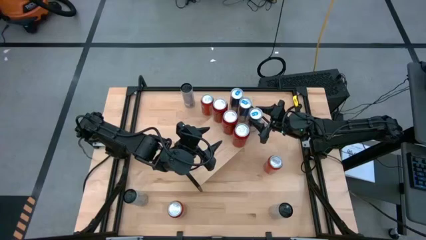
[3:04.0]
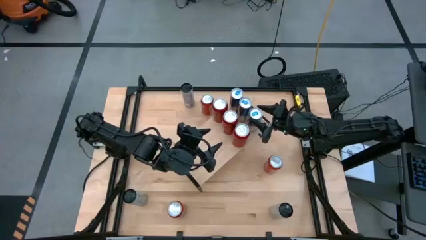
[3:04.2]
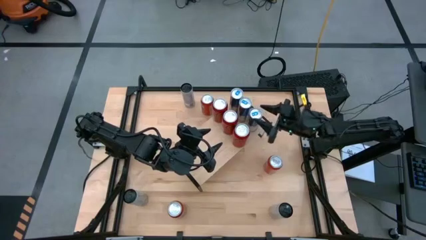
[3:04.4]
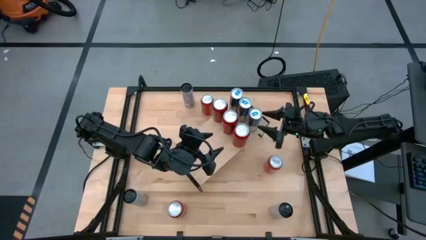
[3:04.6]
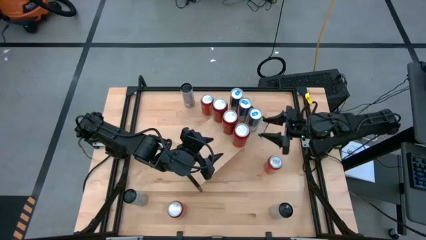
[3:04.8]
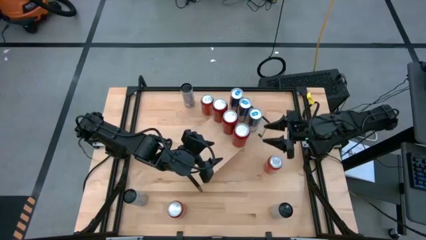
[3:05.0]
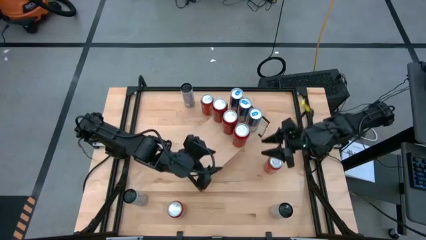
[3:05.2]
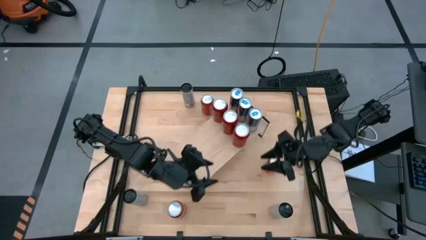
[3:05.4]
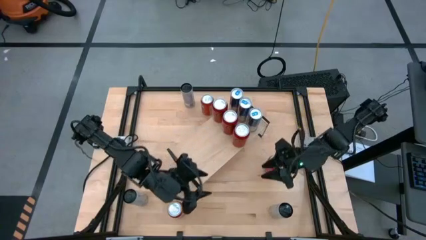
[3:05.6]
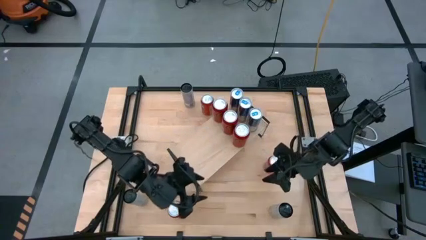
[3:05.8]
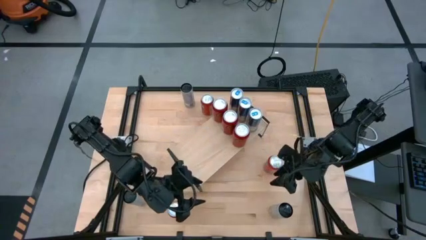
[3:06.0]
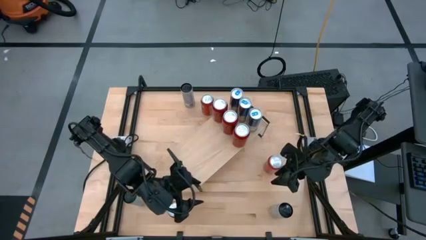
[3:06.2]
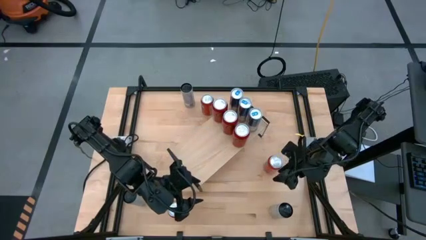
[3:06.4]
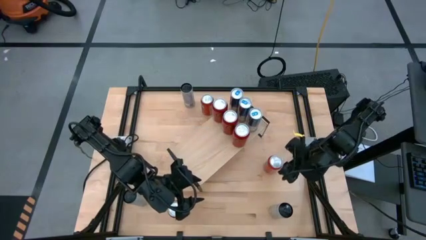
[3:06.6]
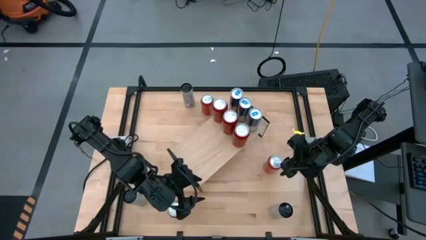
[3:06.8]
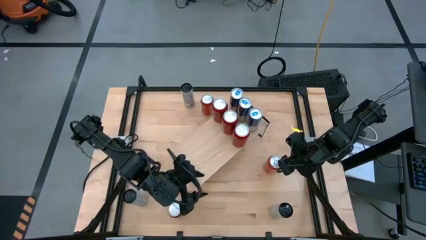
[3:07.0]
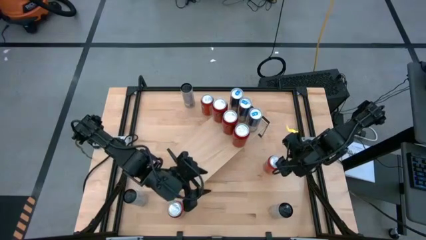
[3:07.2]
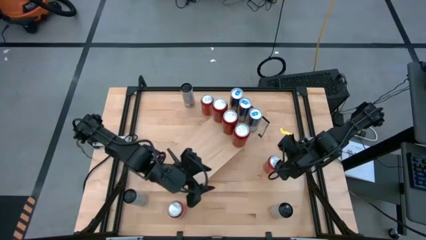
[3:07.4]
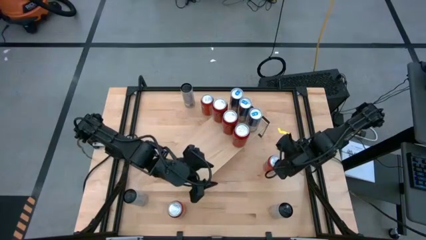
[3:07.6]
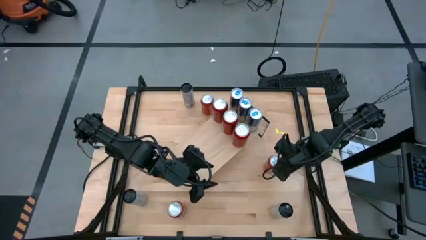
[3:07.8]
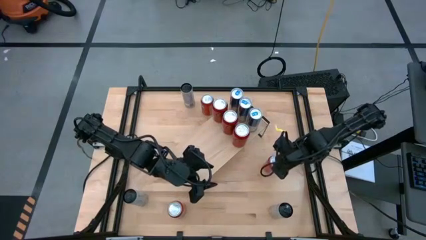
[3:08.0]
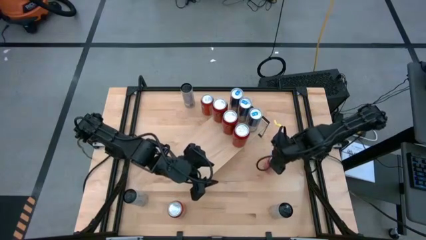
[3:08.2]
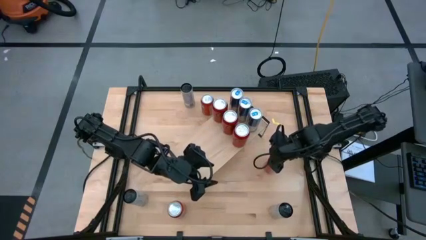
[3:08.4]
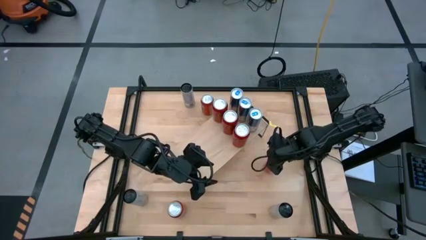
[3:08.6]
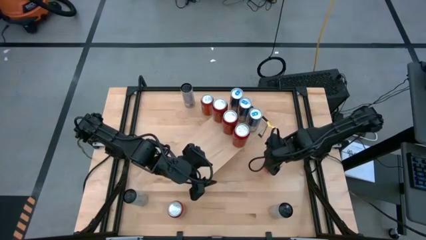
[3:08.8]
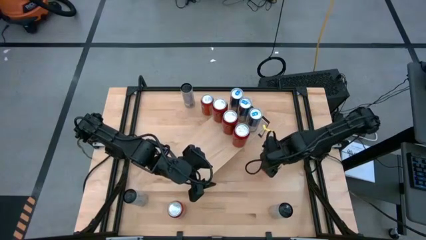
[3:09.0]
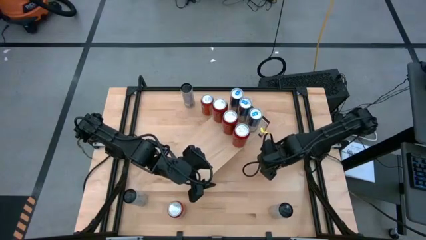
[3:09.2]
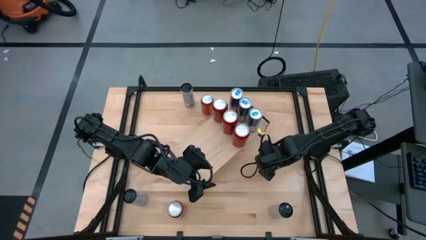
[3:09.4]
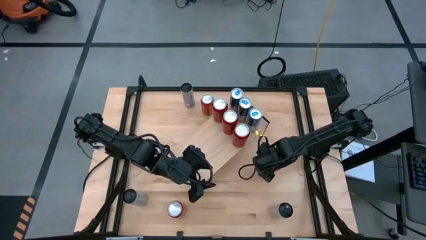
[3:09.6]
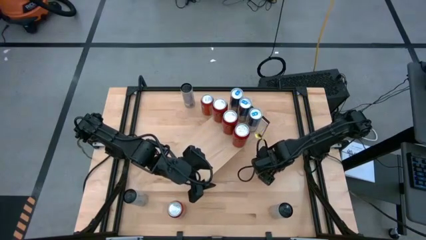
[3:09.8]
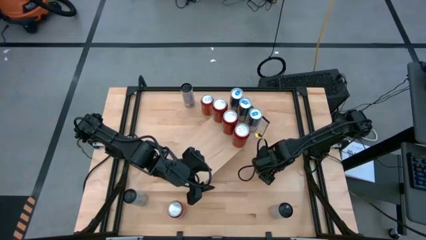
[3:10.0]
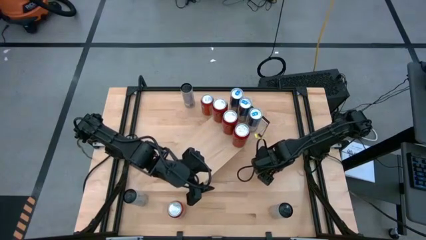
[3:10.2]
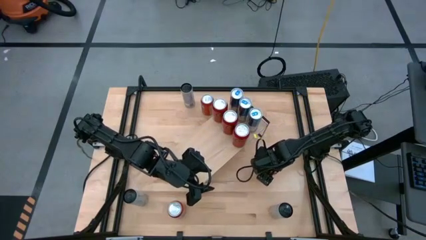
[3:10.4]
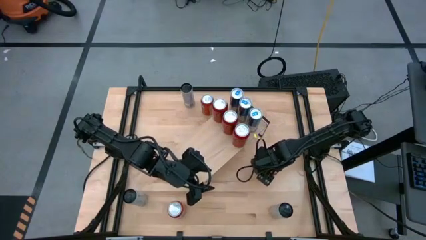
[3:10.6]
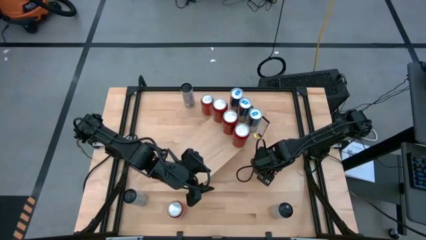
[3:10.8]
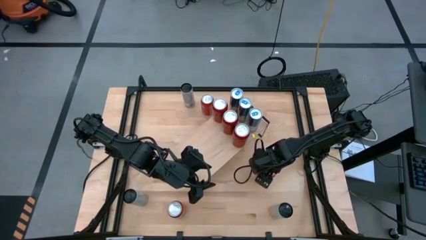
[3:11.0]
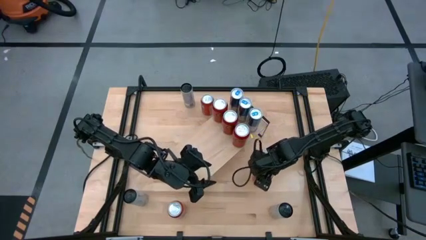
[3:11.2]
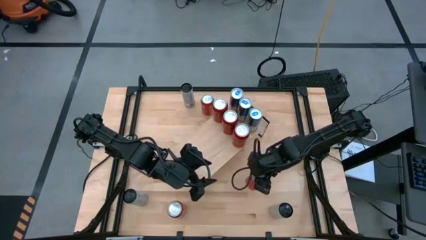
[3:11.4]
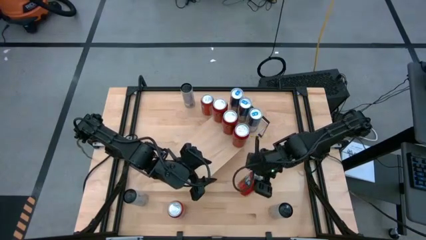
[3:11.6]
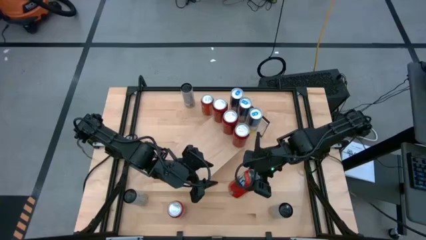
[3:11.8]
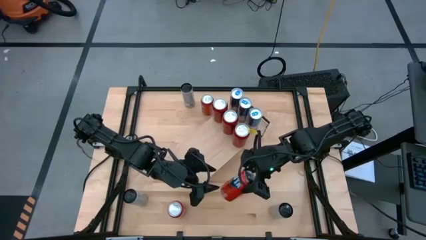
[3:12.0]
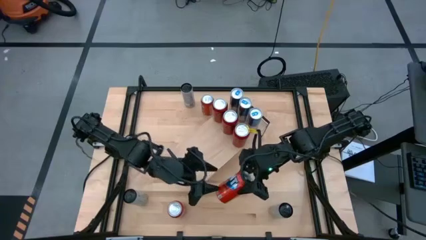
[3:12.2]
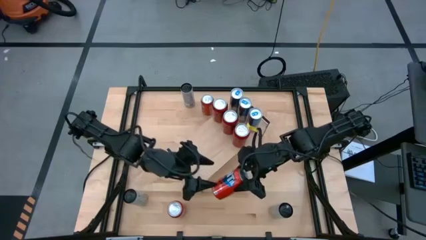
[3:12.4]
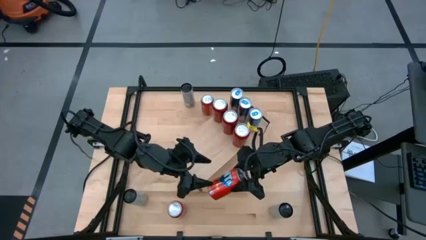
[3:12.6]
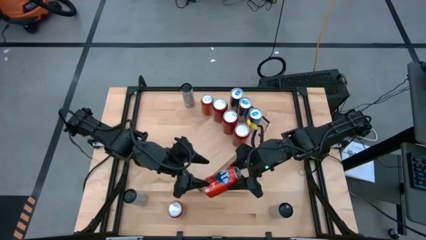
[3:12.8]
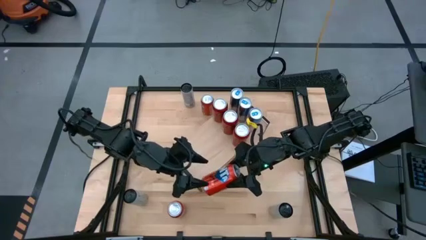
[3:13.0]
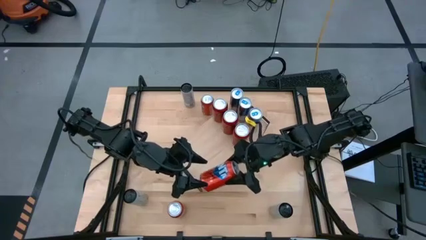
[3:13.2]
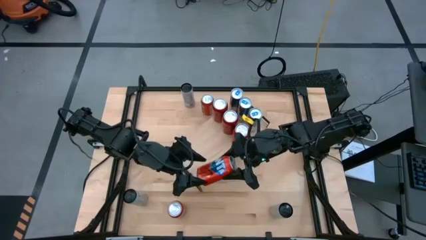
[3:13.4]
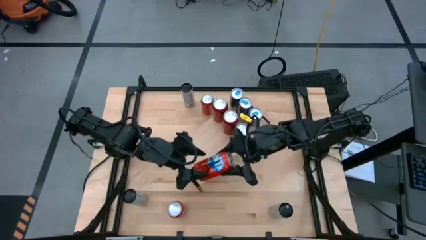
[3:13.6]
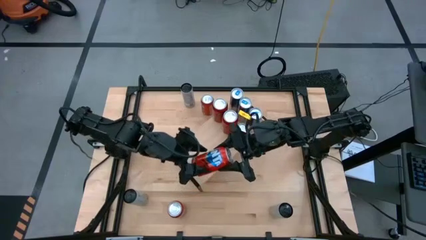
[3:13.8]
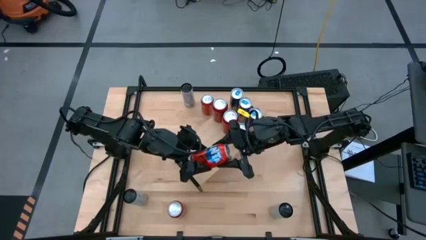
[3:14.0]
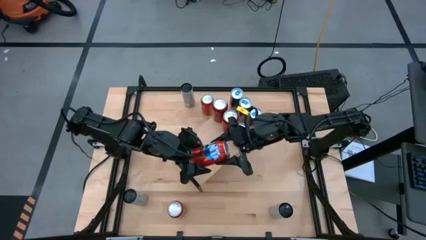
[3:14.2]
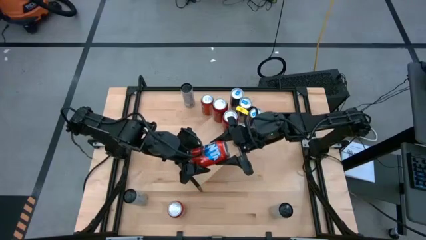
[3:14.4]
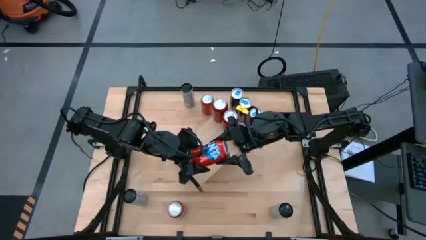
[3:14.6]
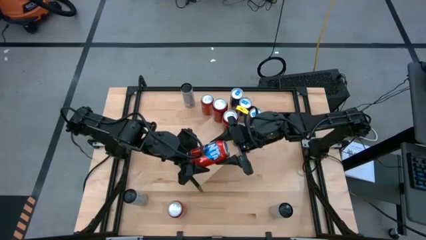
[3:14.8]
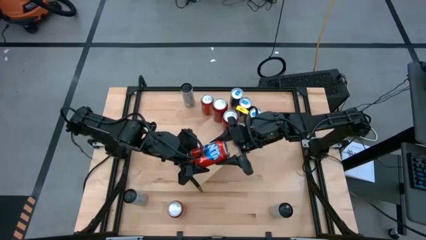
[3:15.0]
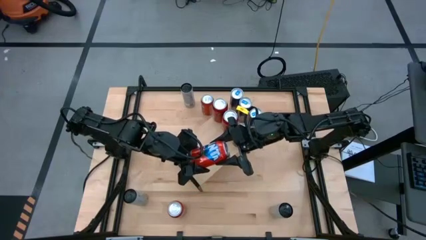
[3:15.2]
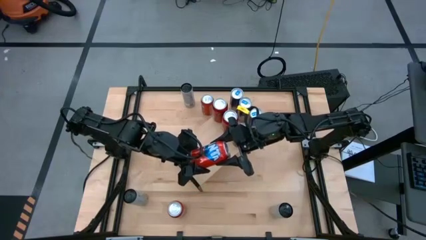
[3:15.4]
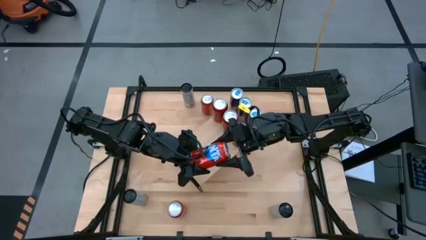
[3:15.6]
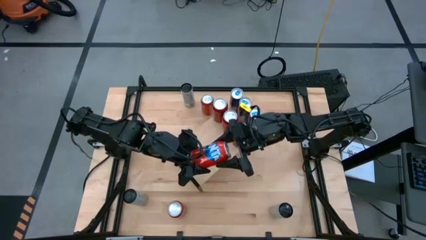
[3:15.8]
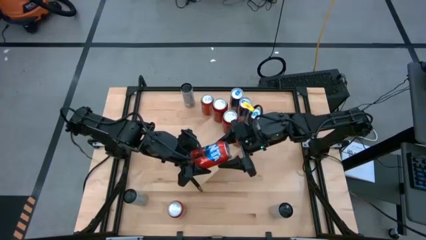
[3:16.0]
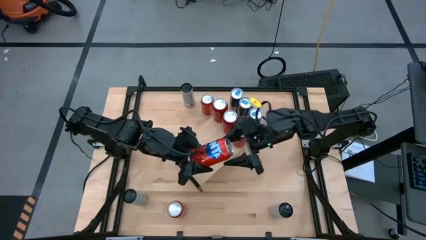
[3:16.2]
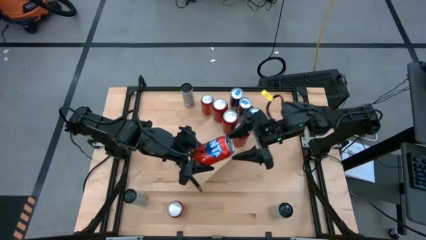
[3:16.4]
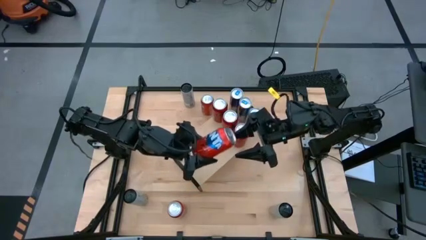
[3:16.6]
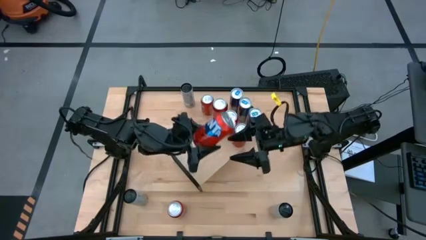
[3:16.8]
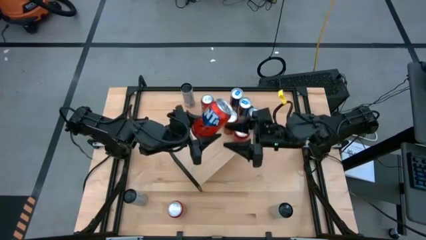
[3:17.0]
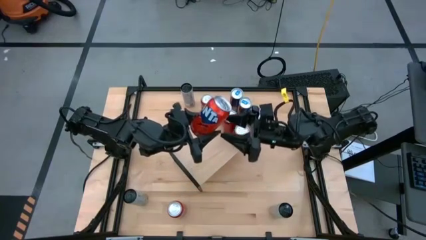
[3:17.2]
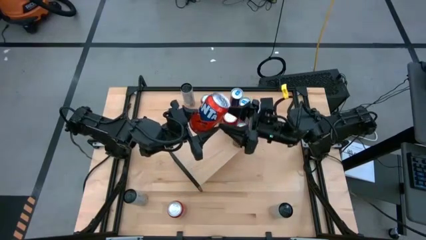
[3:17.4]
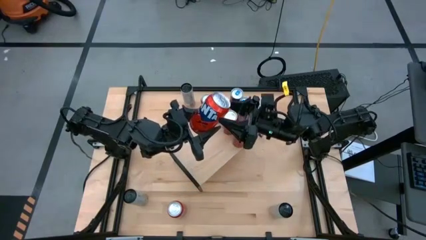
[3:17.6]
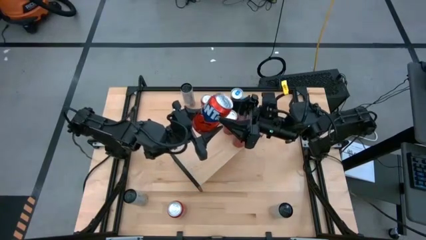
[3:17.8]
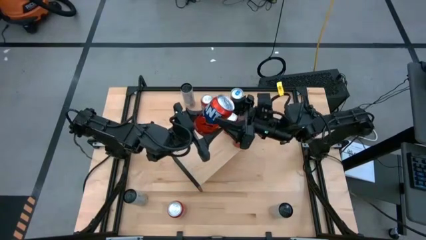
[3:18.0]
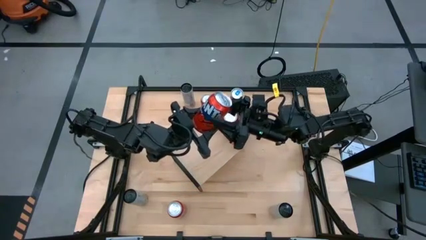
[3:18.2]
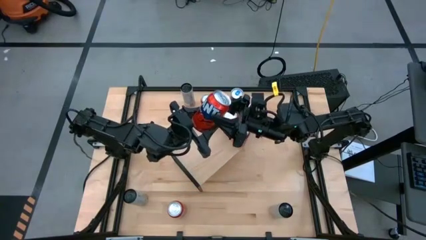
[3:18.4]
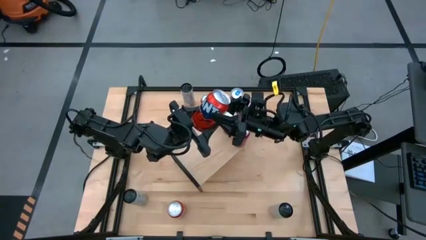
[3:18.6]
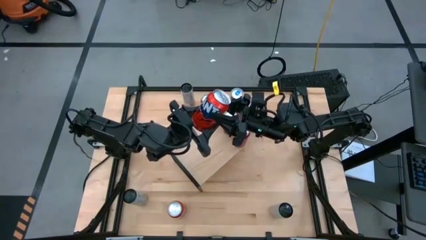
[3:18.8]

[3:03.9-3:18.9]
Task: Place canned beverage on shelf
Put the middle orange soda can on the shelf
